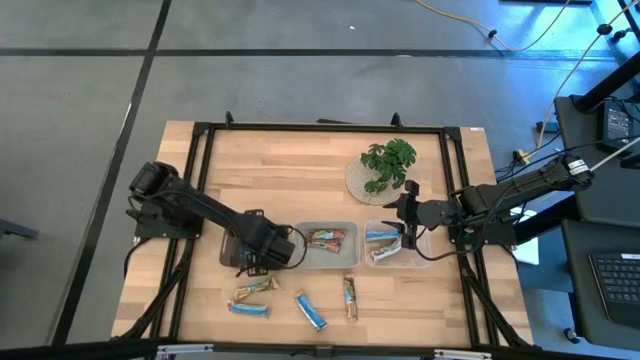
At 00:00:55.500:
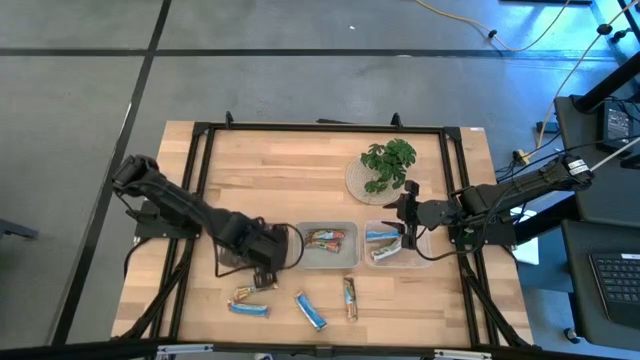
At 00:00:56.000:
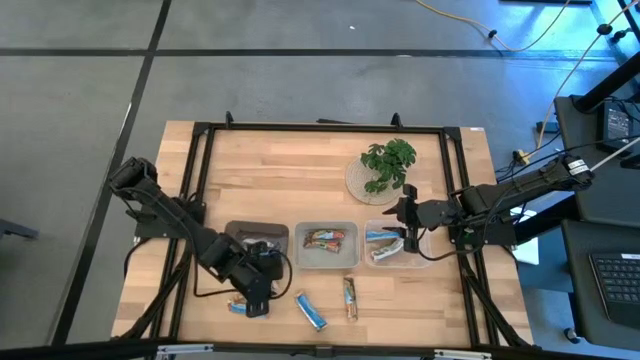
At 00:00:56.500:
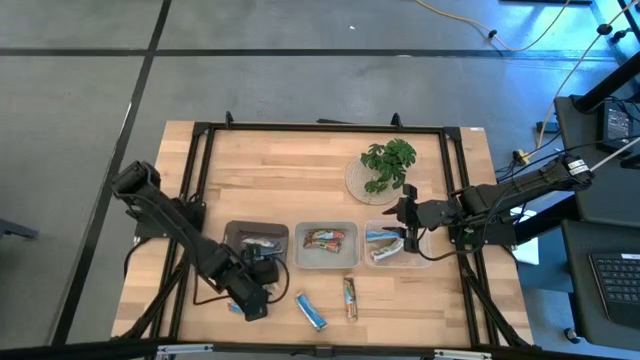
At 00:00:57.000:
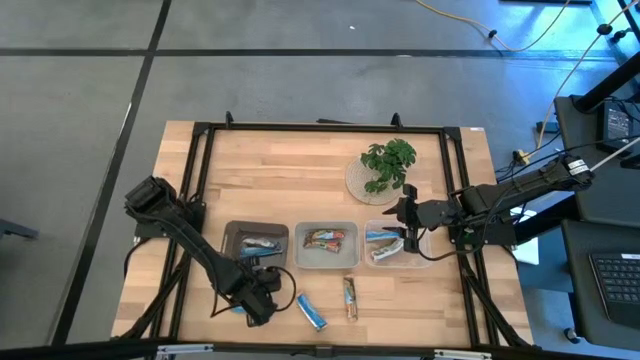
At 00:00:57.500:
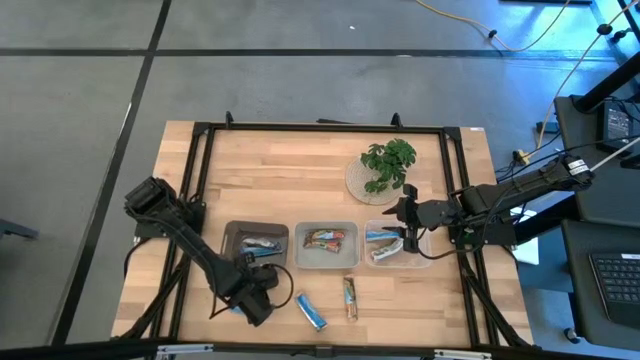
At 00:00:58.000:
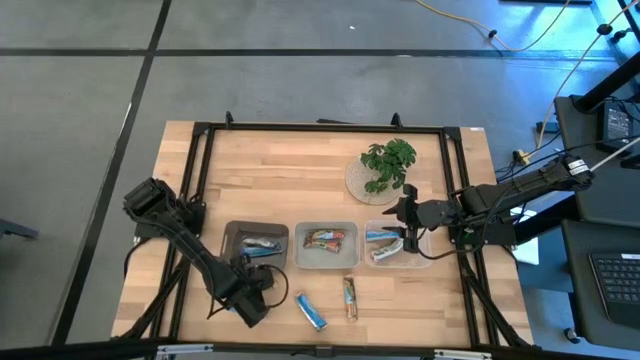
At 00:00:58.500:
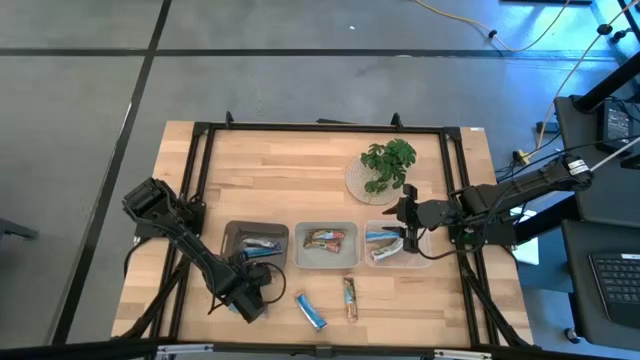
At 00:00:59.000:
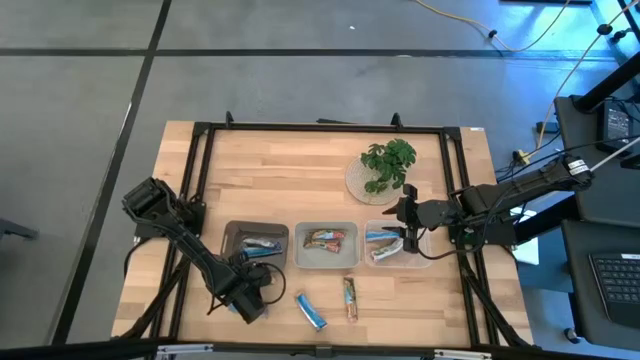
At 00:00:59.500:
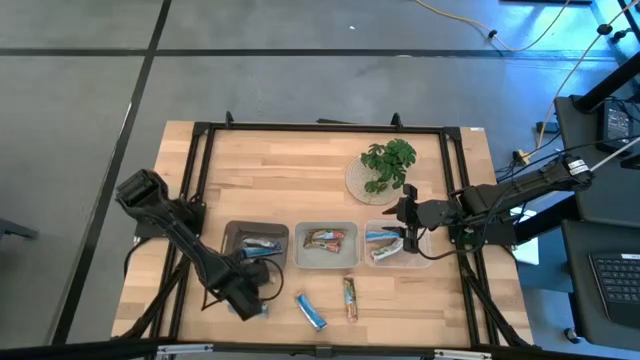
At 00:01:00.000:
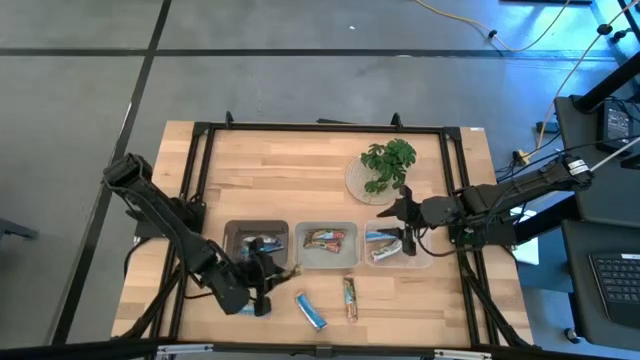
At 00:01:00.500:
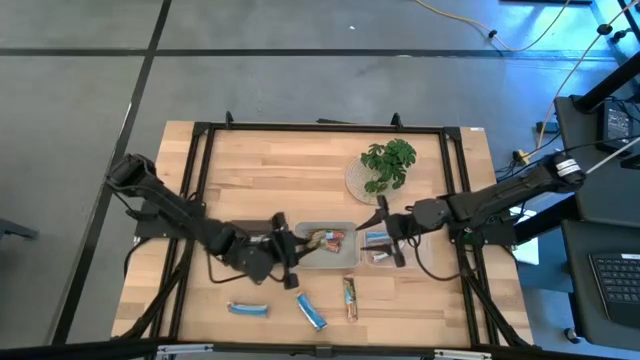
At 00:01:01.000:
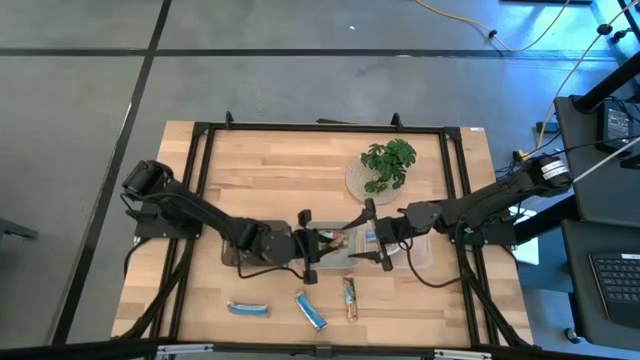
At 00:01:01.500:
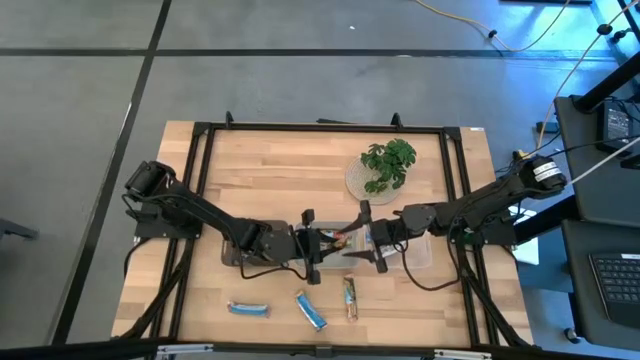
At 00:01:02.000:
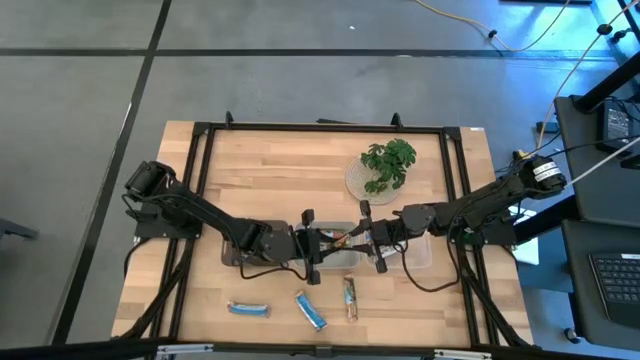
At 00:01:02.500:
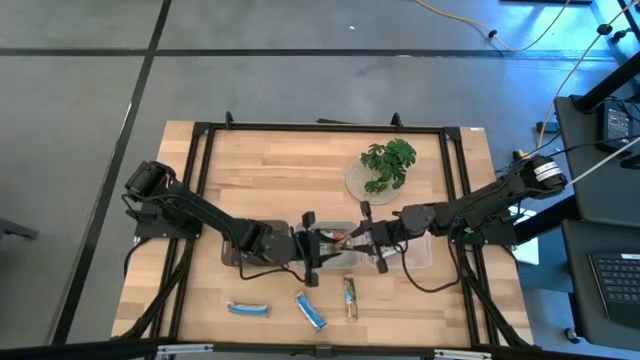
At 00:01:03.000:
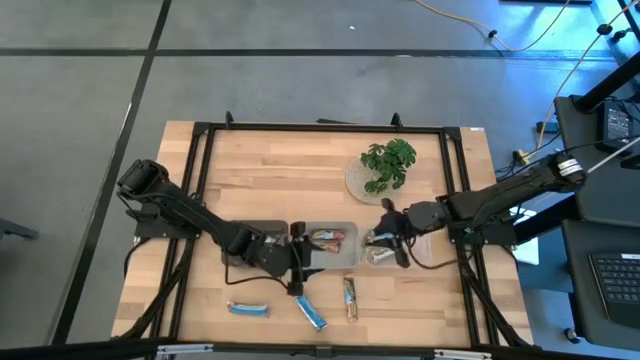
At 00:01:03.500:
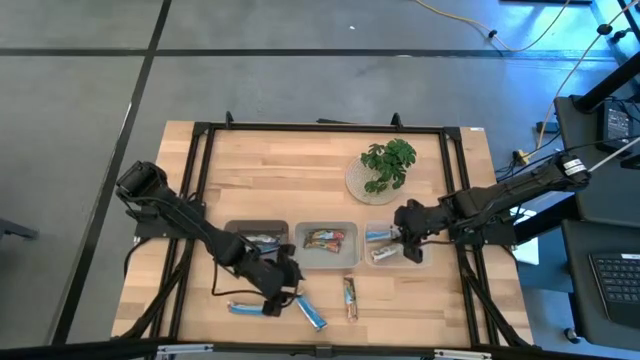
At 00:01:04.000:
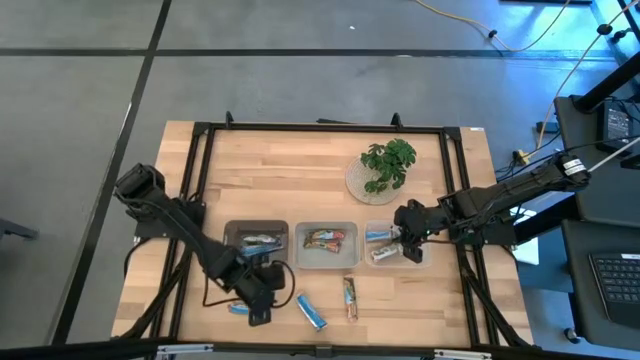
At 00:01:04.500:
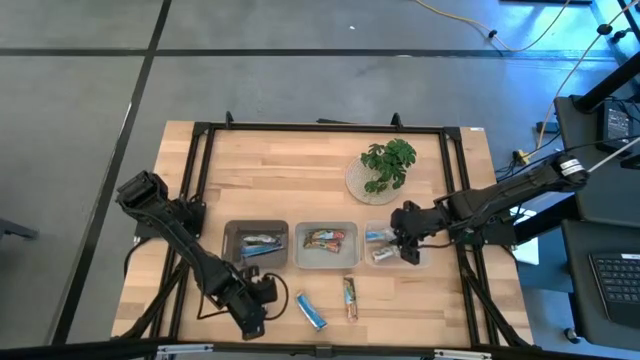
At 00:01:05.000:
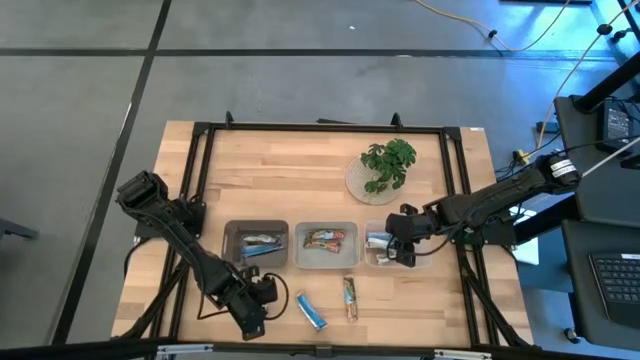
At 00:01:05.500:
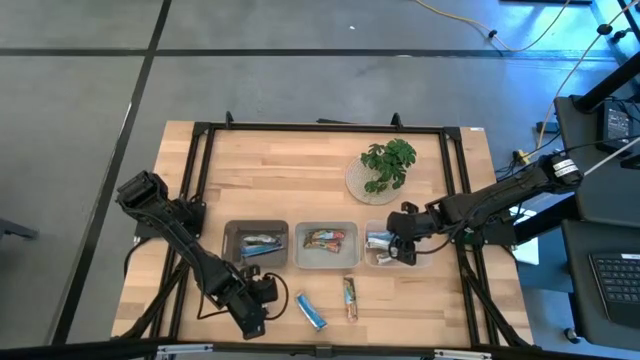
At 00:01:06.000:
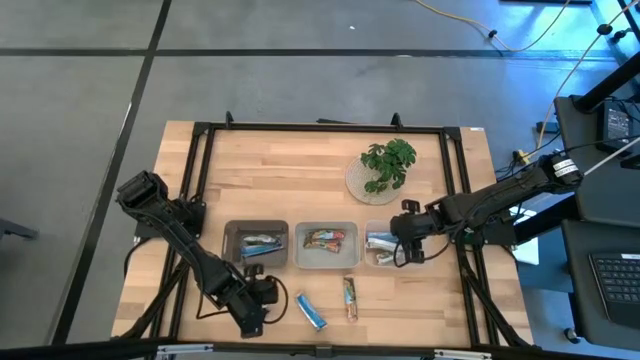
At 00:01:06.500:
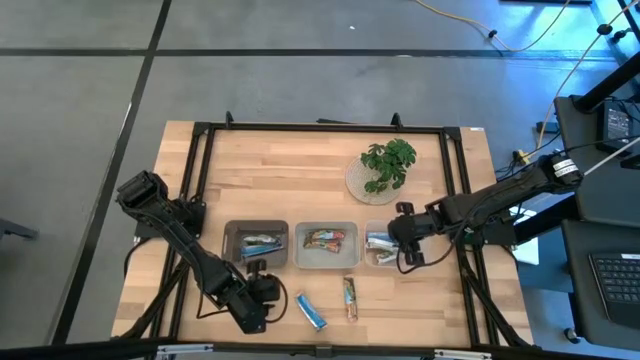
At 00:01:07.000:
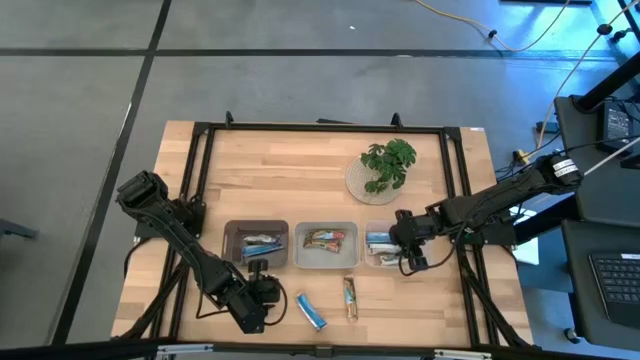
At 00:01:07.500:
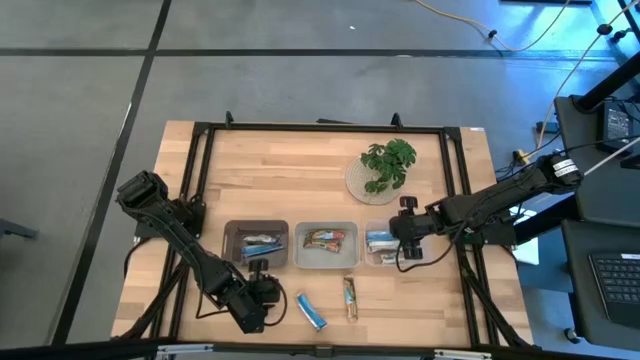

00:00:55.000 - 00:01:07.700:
Task: Pick and place Granola Bars by type
Put the orange granola bar into the transparent bin

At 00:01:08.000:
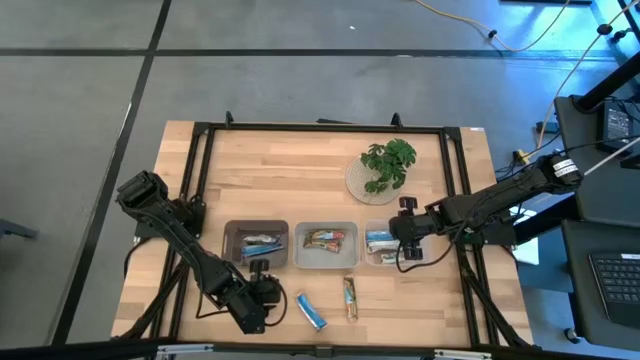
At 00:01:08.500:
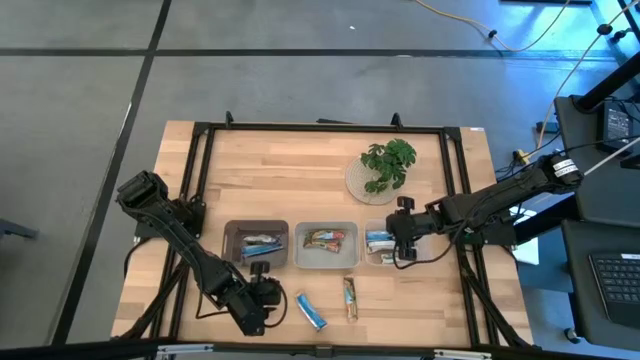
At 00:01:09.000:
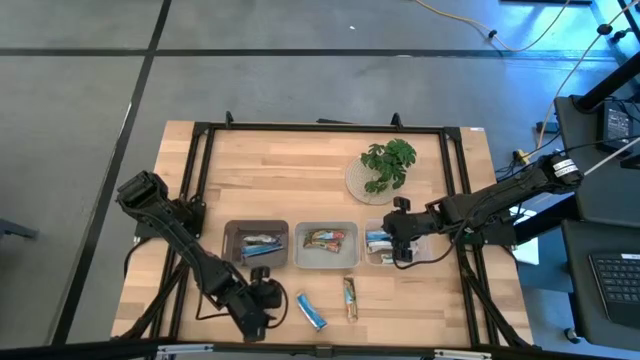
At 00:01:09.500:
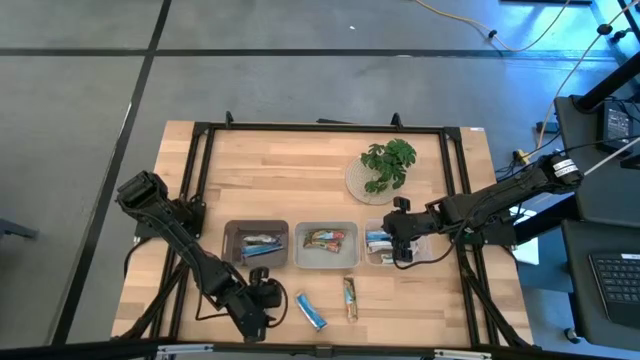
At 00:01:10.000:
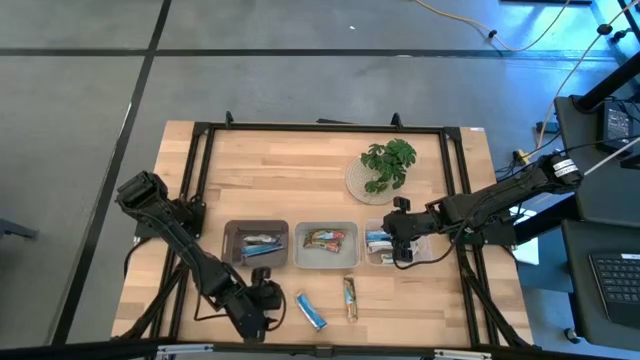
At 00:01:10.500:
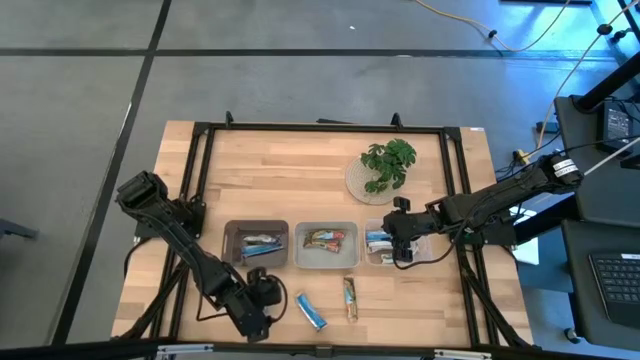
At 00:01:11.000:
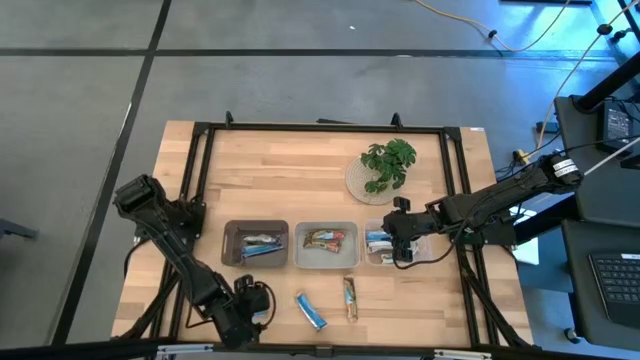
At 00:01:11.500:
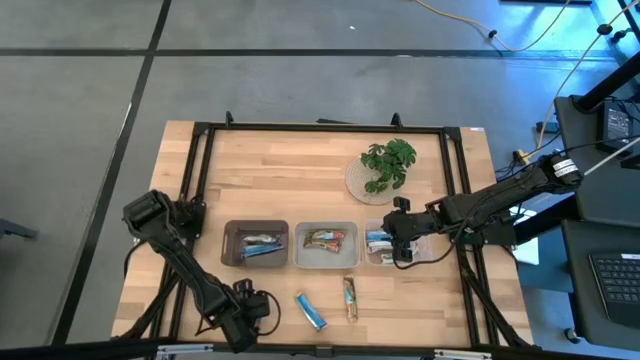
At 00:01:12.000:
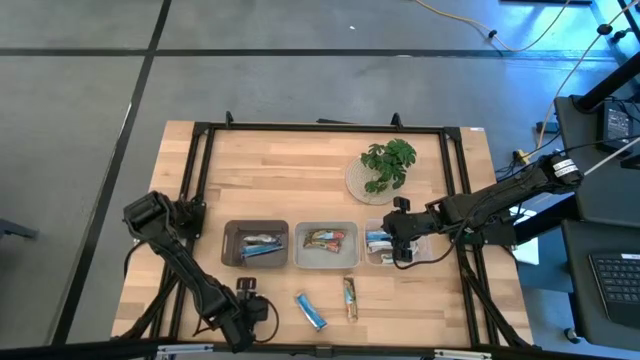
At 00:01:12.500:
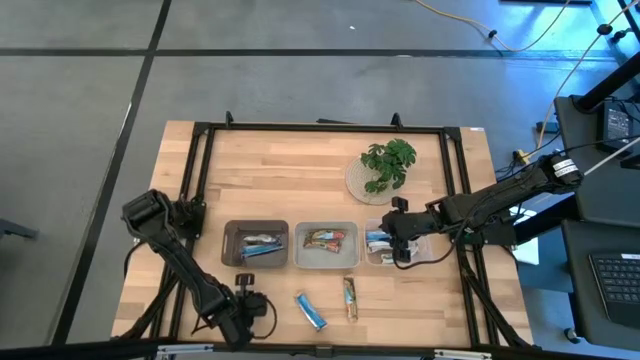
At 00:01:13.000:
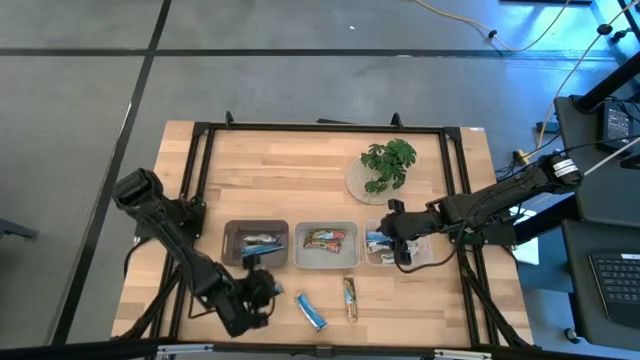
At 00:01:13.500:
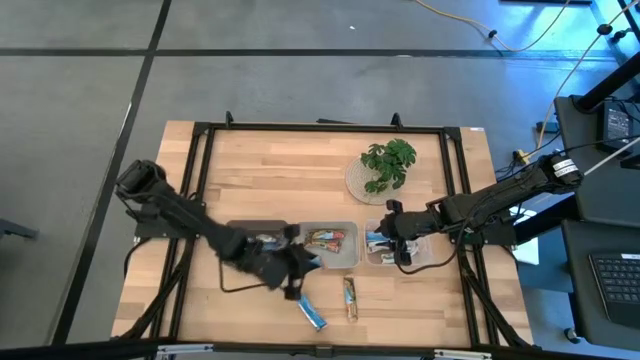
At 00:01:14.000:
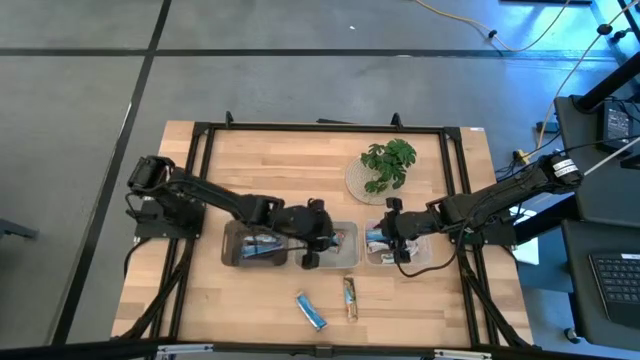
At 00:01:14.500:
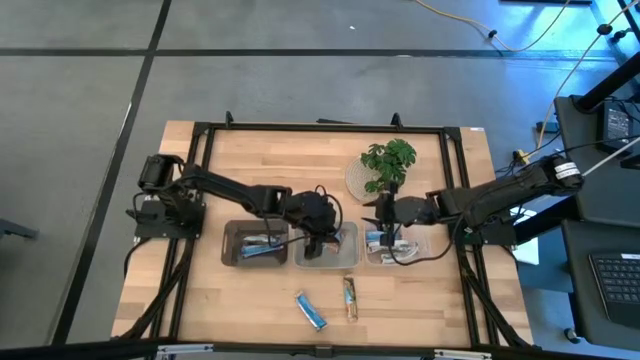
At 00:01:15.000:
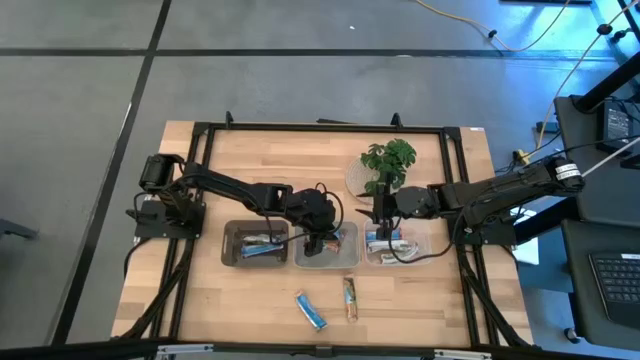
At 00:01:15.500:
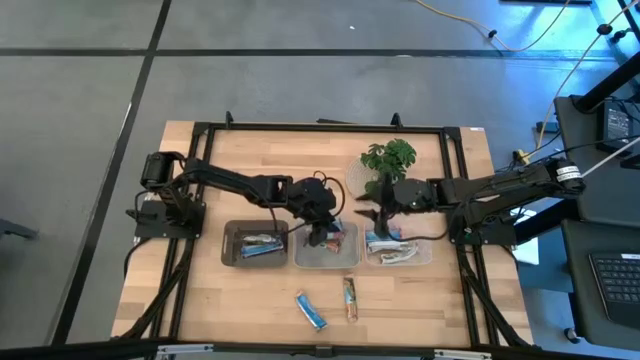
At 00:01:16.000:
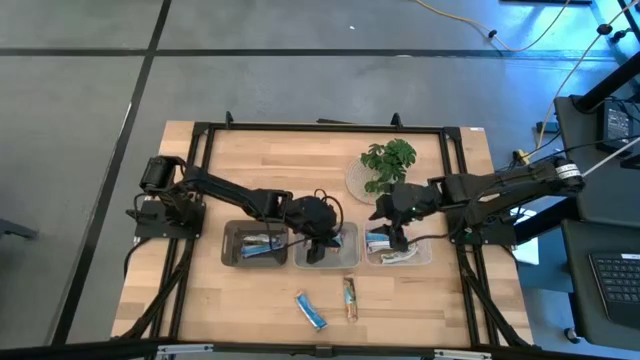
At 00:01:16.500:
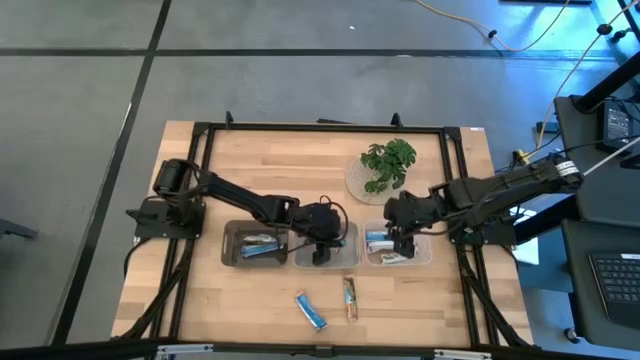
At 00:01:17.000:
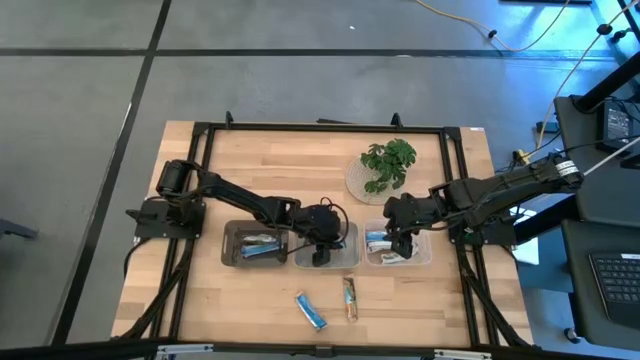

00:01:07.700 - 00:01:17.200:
Put the red granola bar into the gray bin
